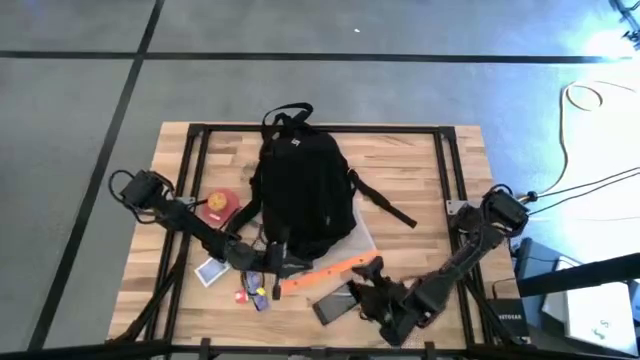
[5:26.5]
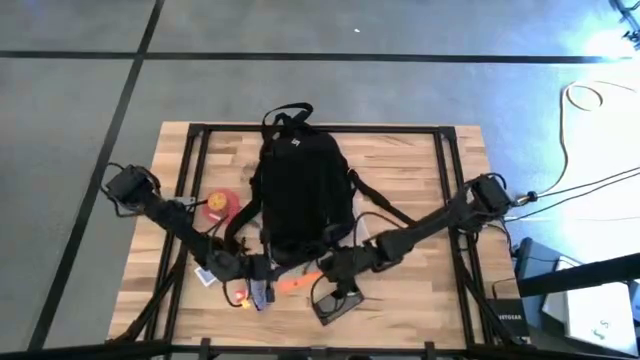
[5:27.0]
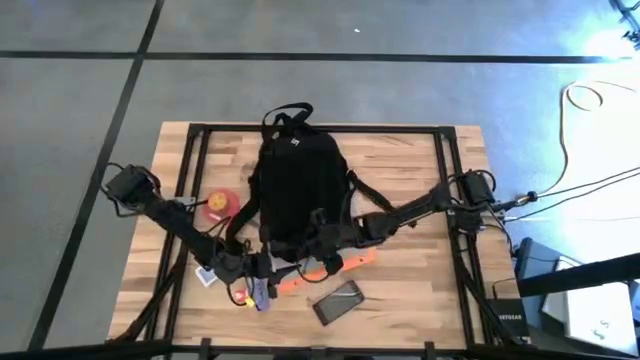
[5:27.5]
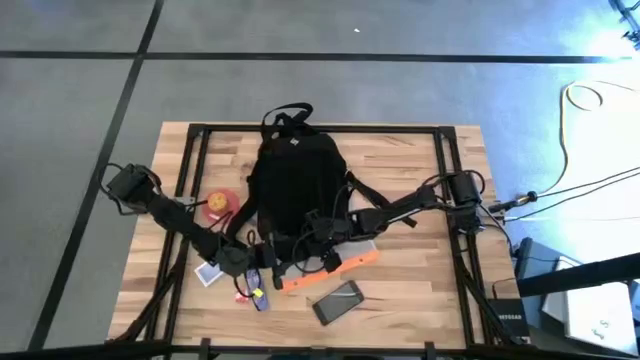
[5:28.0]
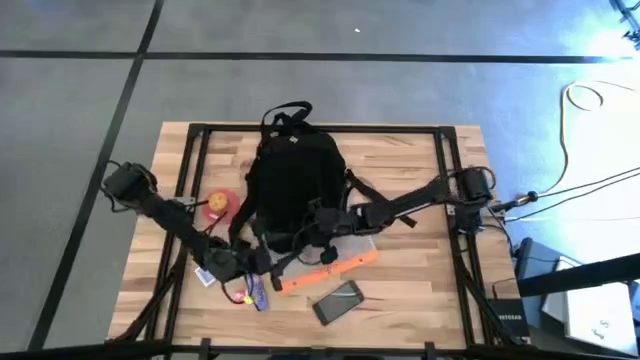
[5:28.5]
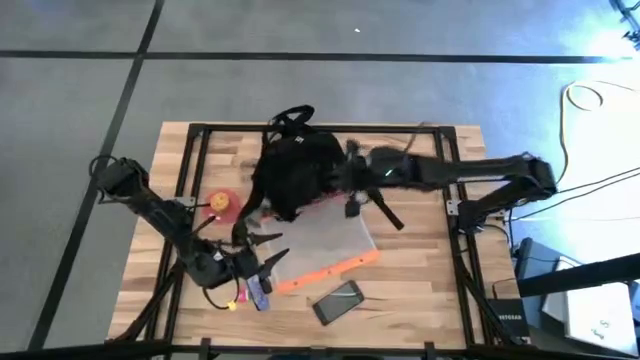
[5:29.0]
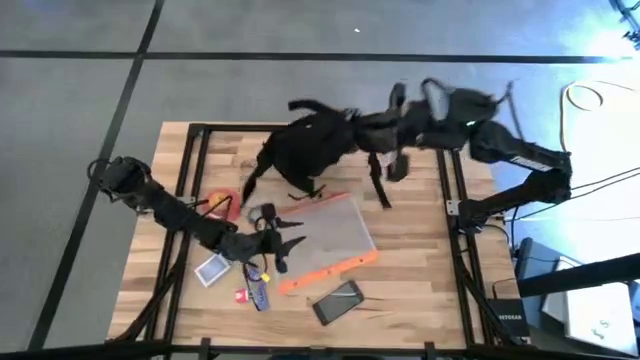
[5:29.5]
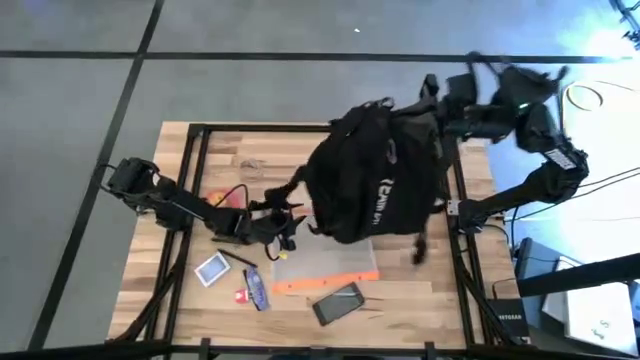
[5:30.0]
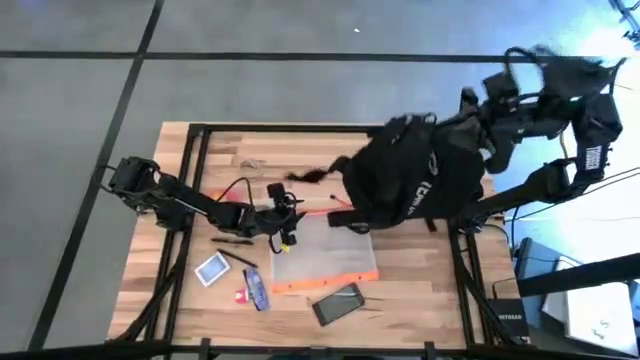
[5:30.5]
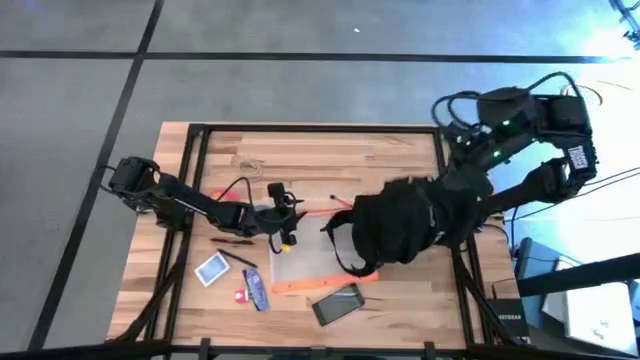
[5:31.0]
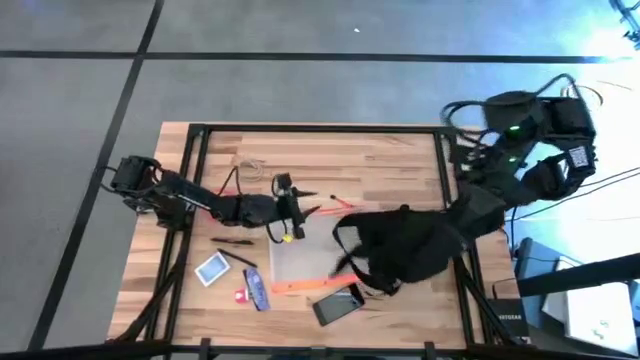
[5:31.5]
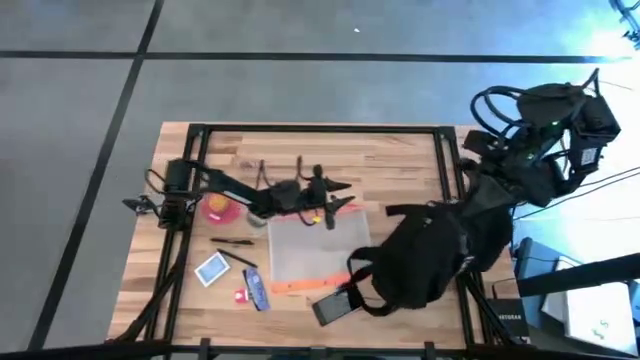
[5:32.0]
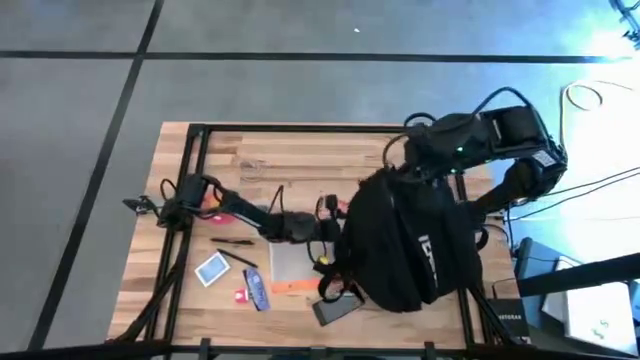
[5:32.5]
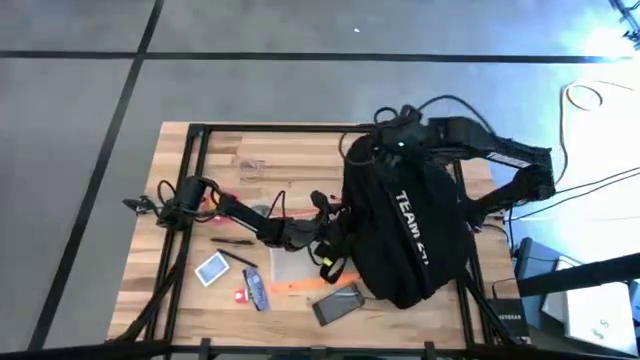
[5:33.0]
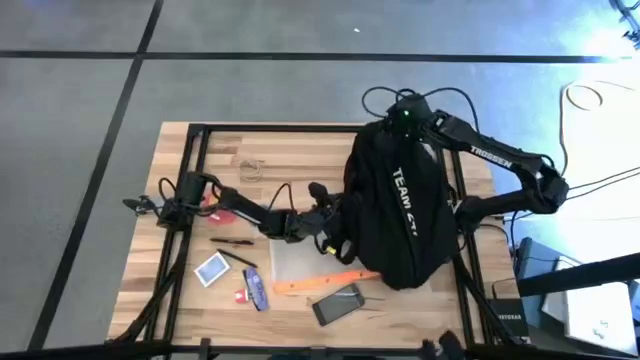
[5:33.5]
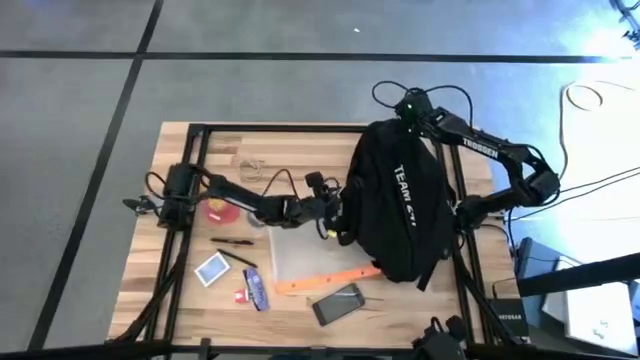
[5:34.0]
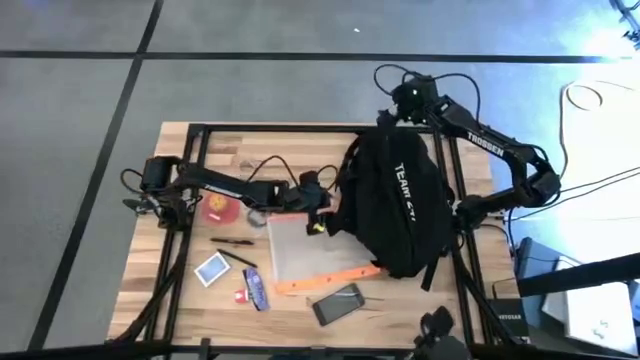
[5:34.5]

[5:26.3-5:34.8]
Task: Unpack backpack
Move the black backpack to the top right of the table

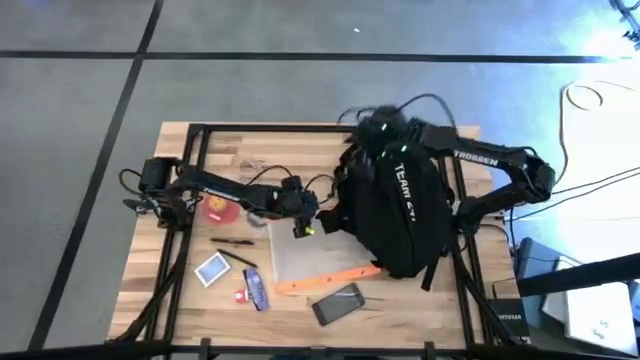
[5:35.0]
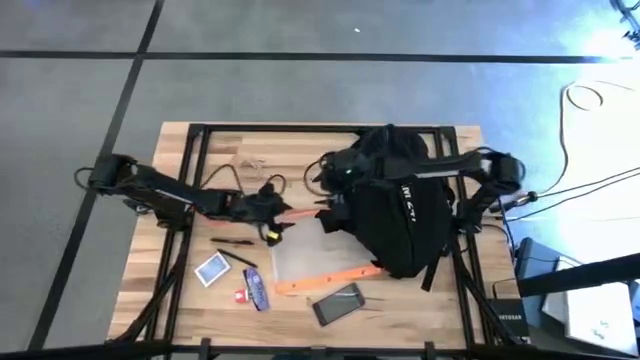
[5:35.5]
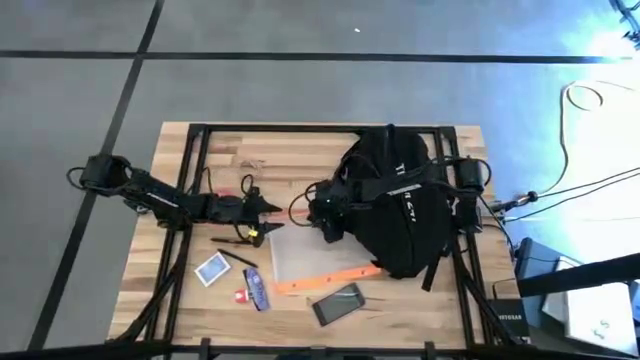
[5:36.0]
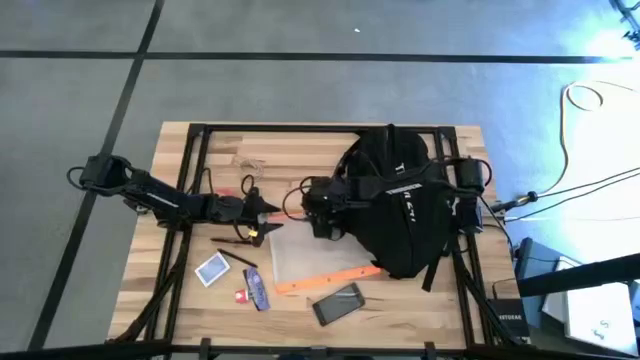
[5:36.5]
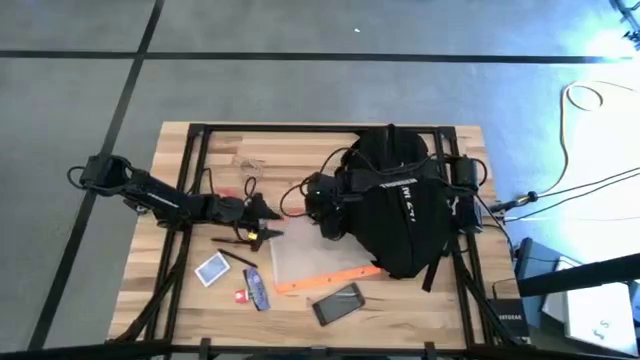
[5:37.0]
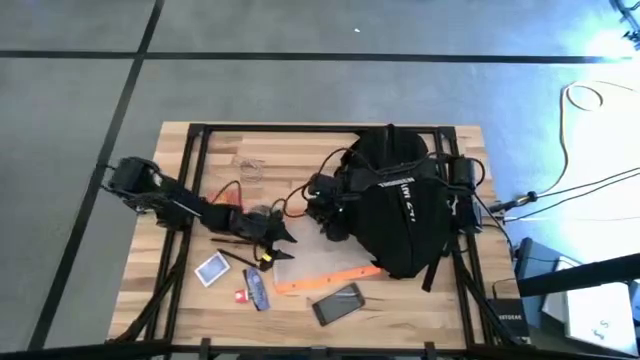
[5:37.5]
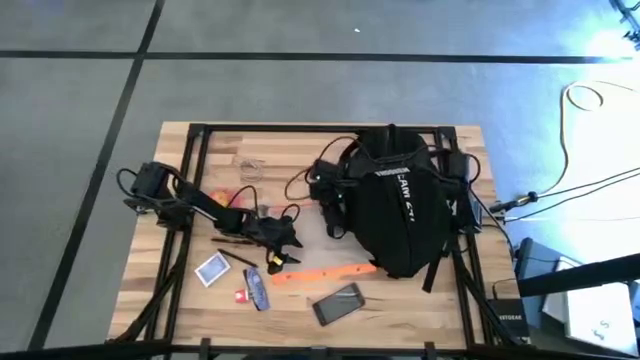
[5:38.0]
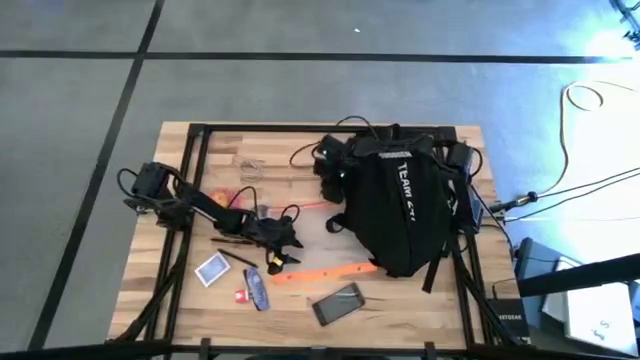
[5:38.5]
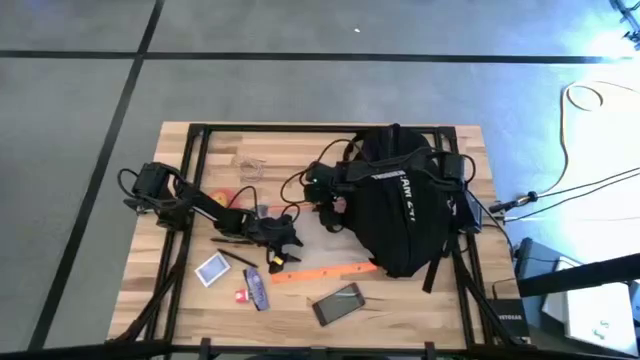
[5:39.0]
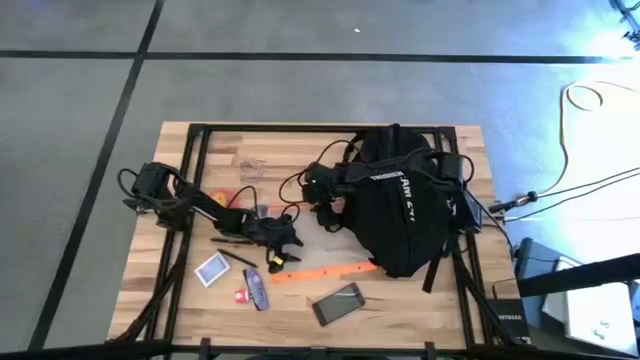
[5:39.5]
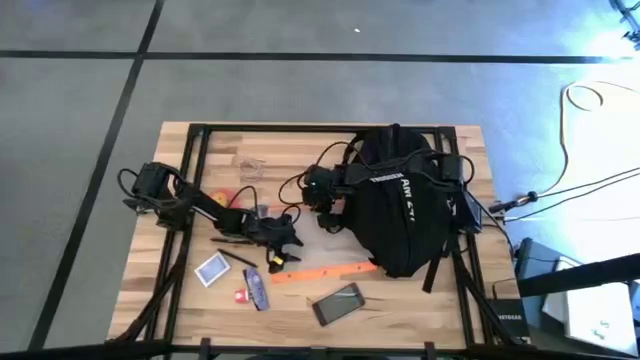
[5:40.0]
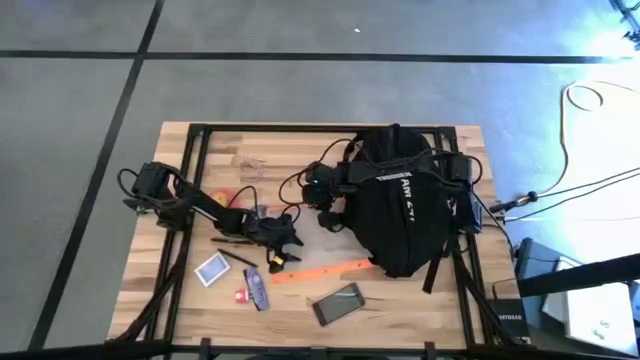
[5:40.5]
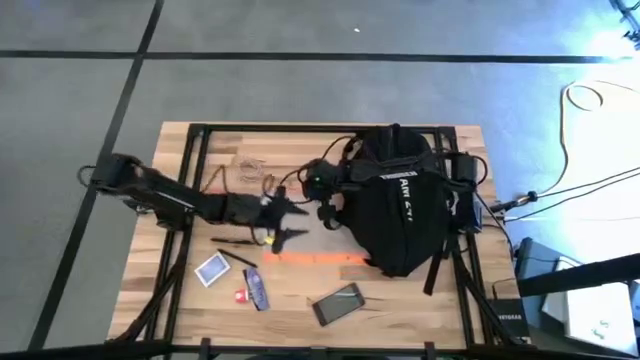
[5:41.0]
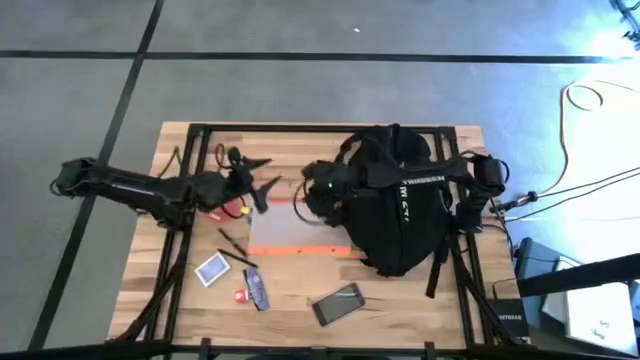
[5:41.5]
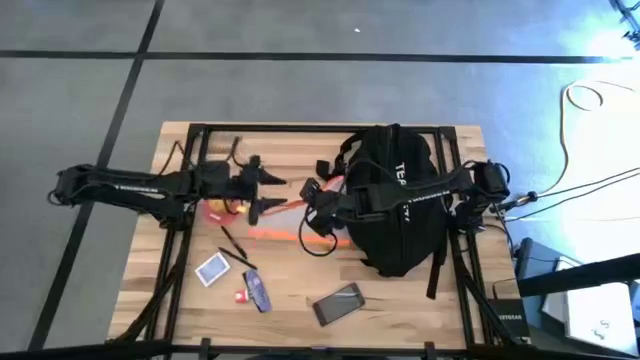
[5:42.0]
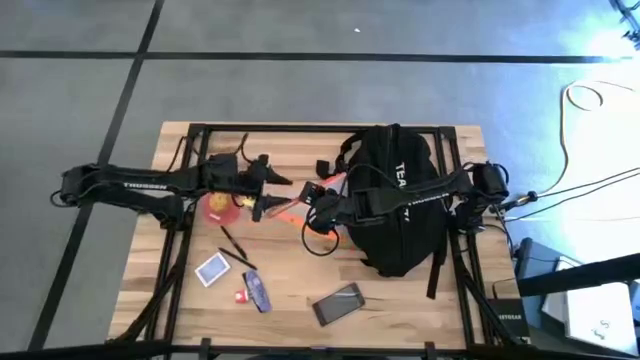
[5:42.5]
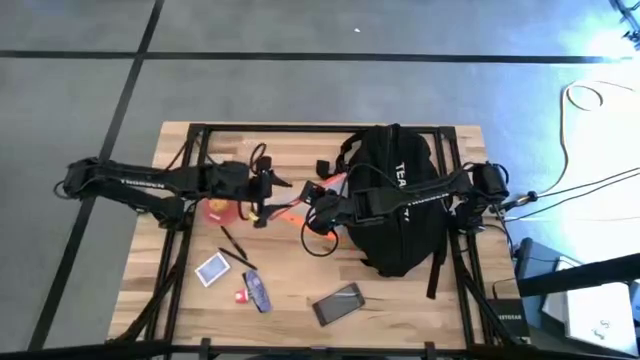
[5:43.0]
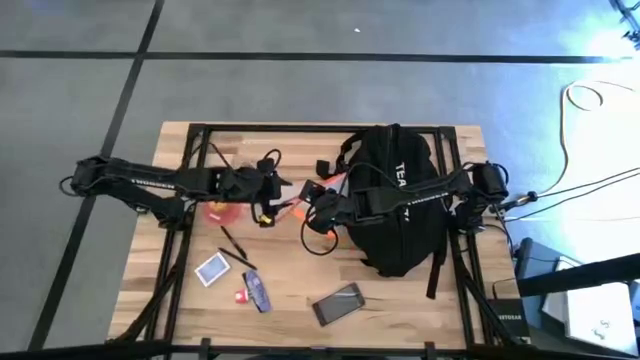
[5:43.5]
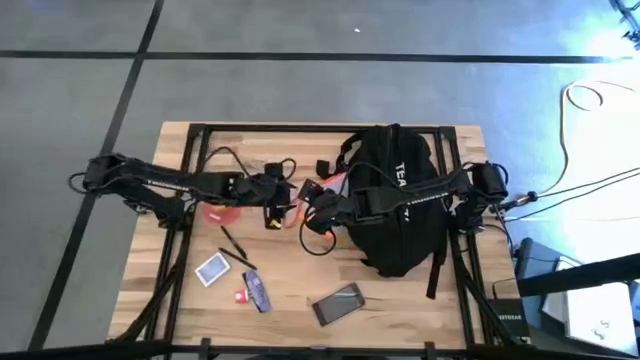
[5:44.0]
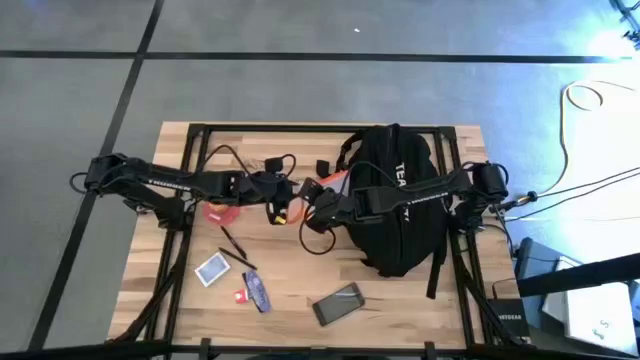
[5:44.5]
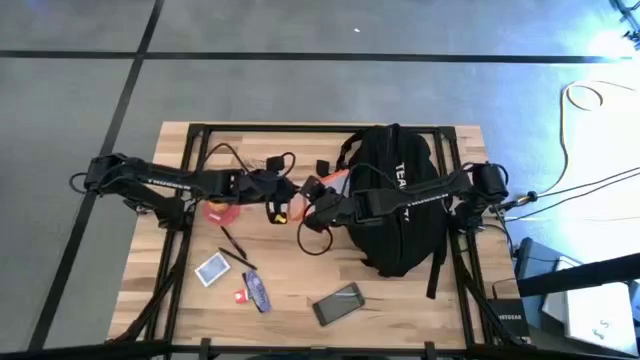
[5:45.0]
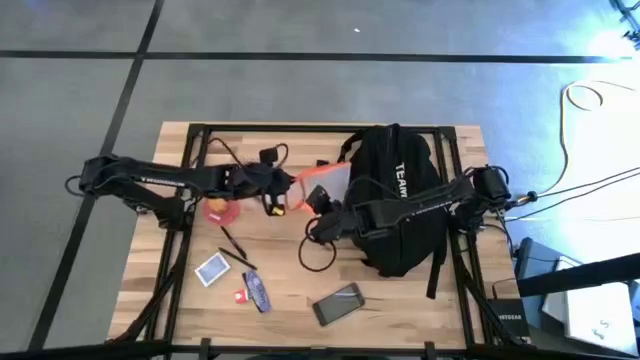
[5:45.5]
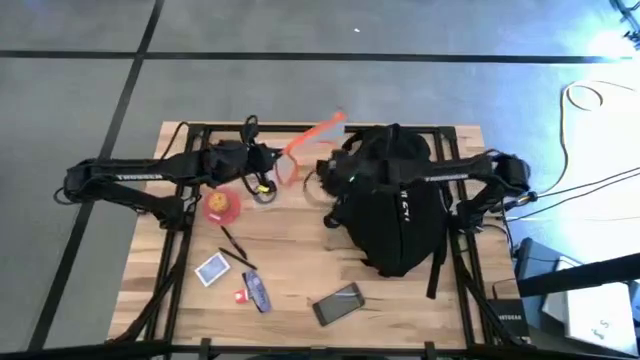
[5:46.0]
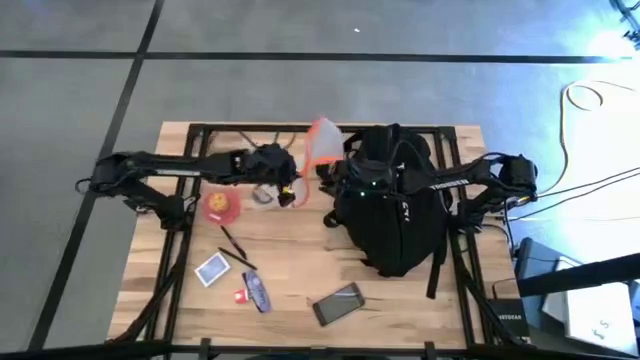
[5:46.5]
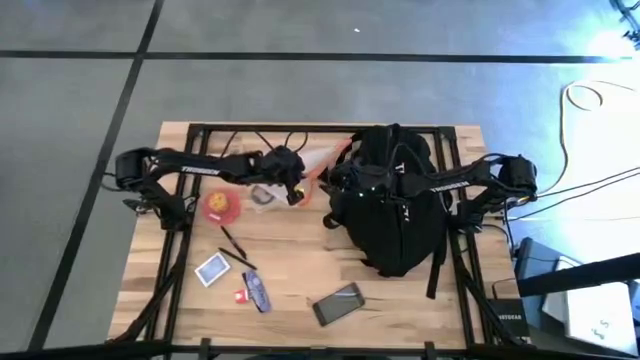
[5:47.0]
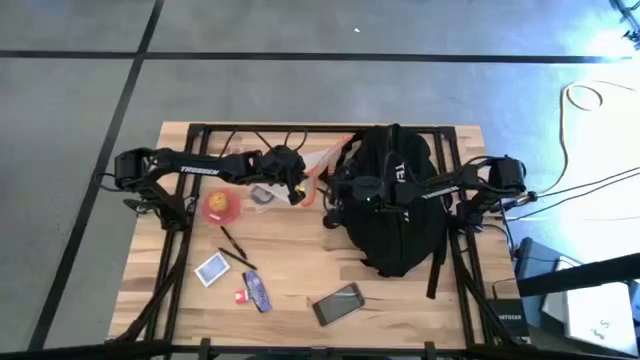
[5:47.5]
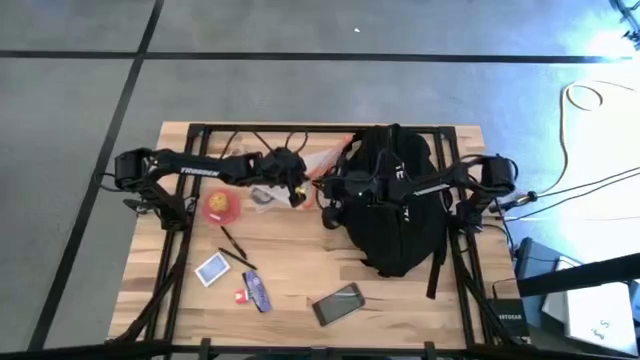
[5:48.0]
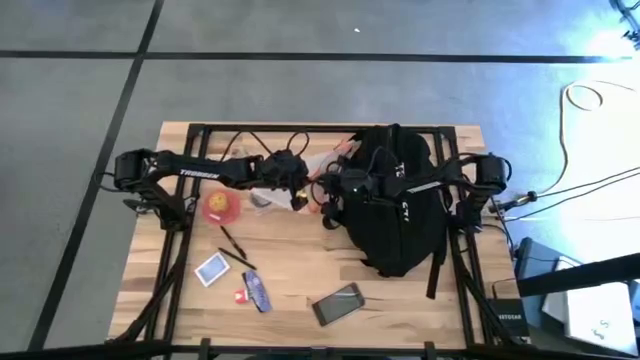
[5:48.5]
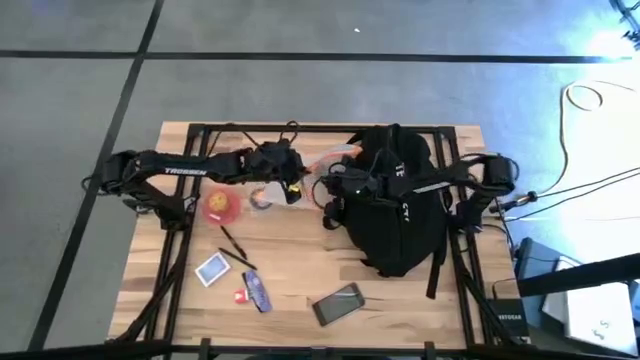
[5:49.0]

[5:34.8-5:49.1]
Open the transparent white zip bag
